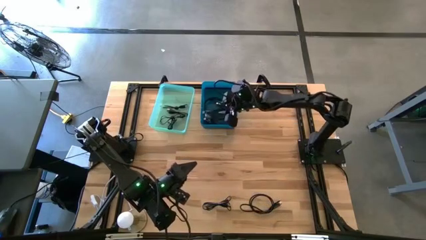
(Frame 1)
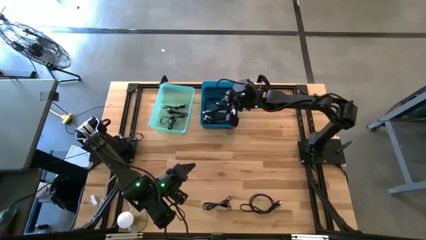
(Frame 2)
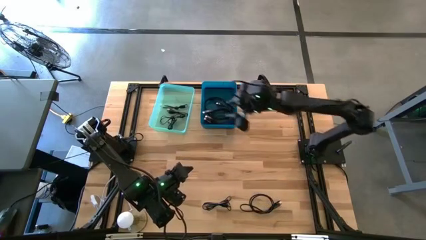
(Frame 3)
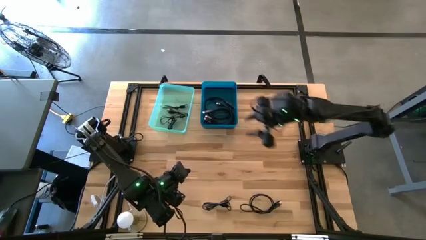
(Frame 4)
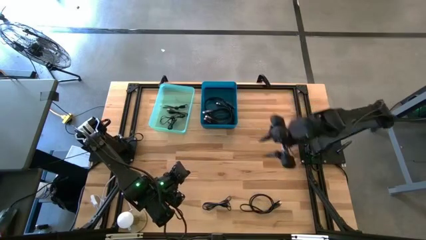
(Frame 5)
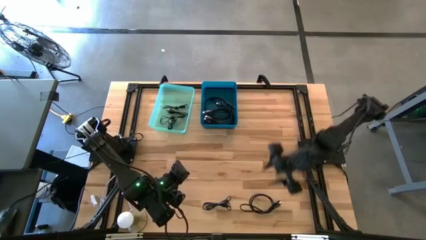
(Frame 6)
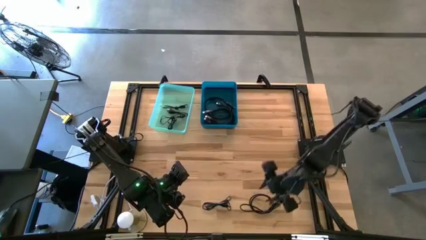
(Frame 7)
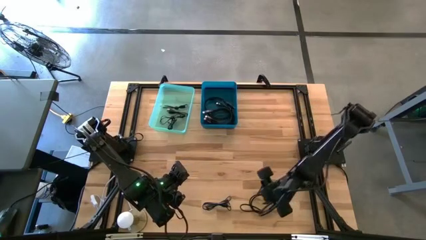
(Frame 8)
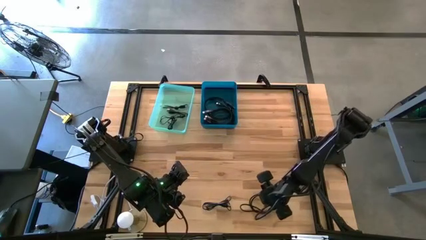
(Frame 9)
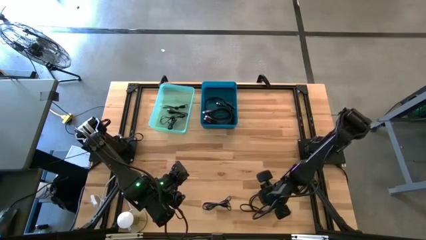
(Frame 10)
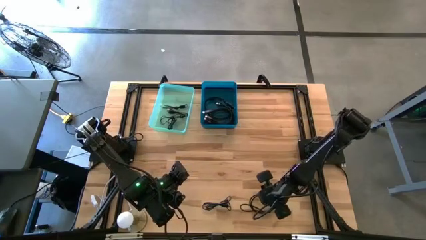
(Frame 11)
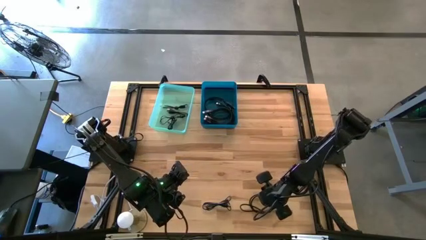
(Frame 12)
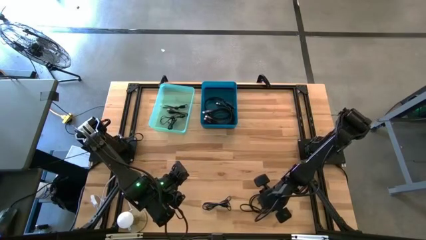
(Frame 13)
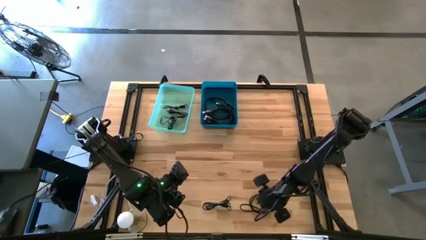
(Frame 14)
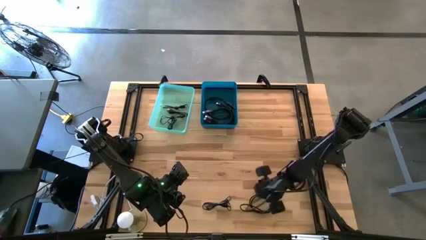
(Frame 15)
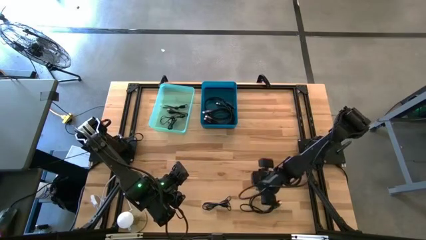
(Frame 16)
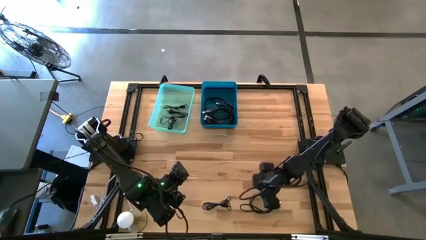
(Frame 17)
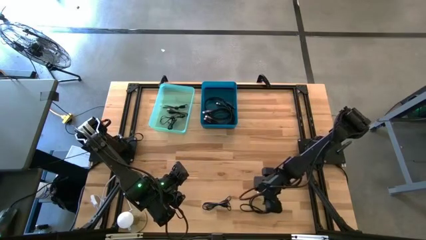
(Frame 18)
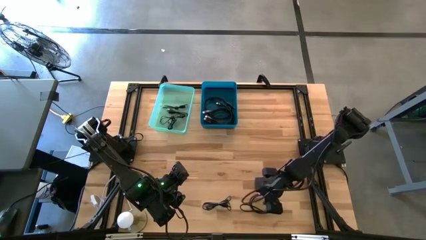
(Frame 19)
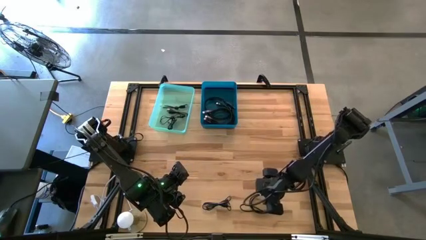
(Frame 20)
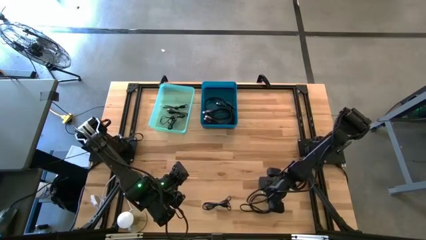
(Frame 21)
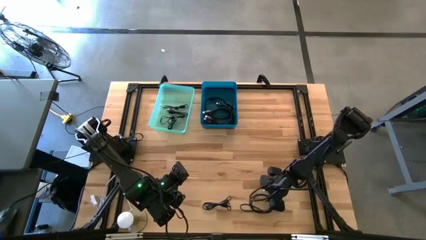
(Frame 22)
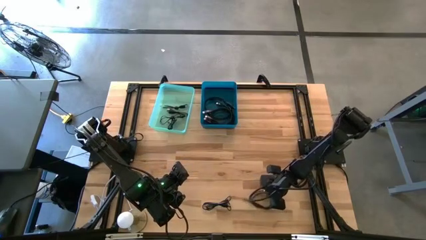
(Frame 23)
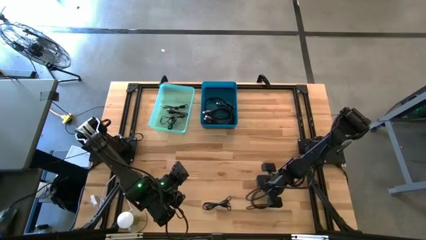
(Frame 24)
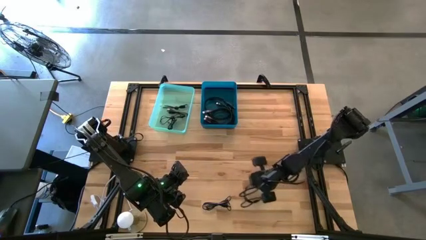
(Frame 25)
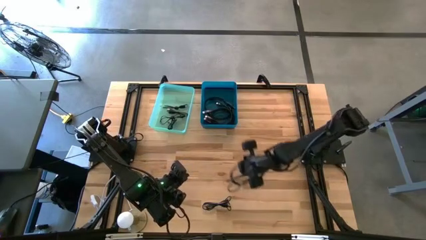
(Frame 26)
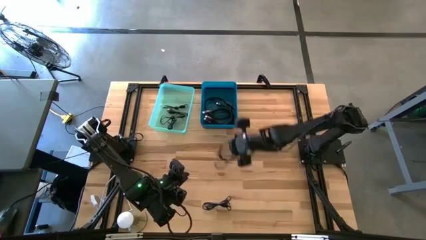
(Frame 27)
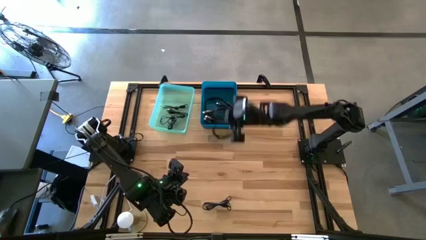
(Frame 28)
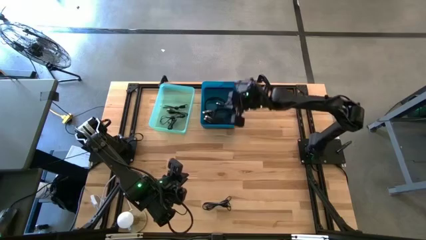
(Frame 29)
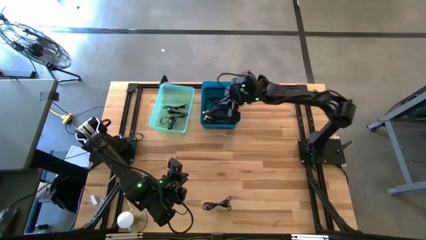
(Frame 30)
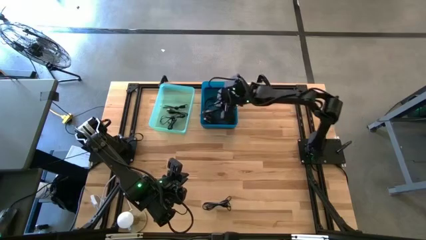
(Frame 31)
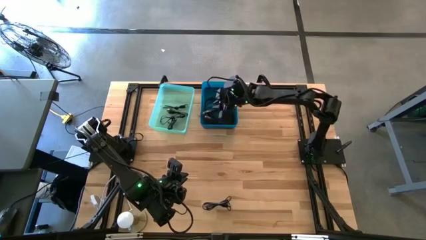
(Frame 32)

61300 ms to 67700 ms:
Task: Pick & Place USB Port
Put the black HDMI cable into the blue bin

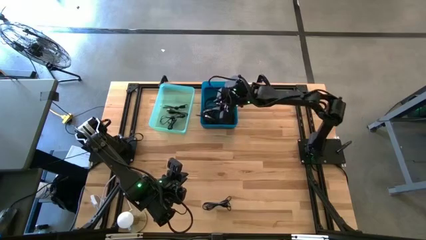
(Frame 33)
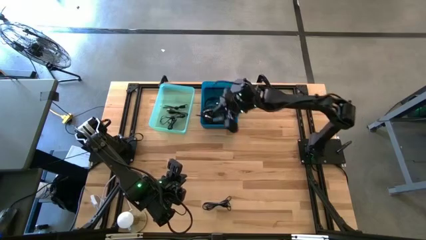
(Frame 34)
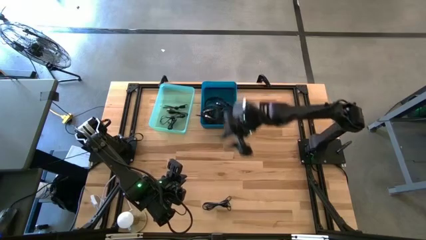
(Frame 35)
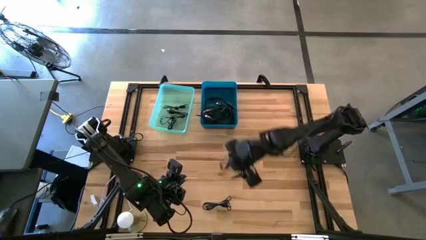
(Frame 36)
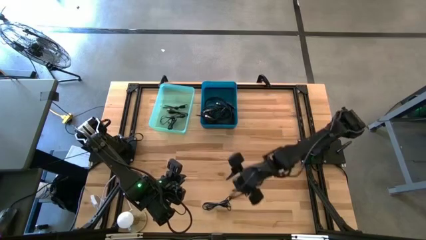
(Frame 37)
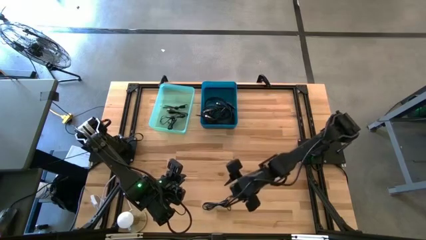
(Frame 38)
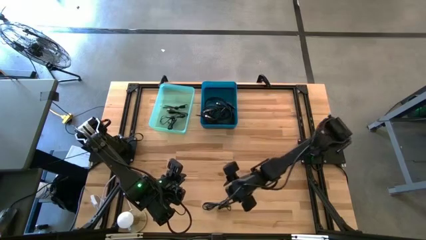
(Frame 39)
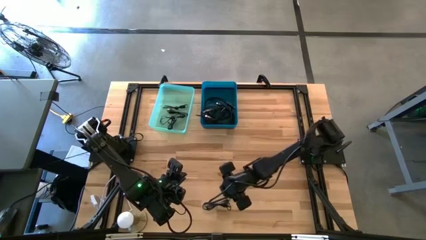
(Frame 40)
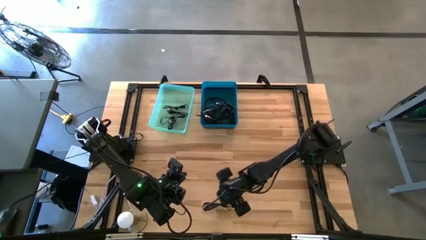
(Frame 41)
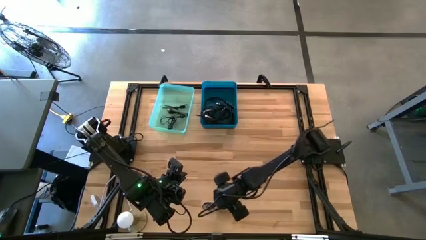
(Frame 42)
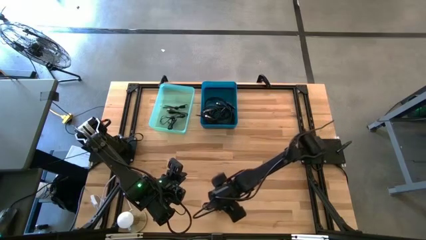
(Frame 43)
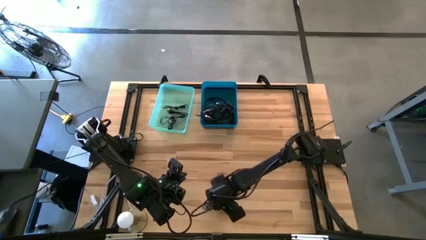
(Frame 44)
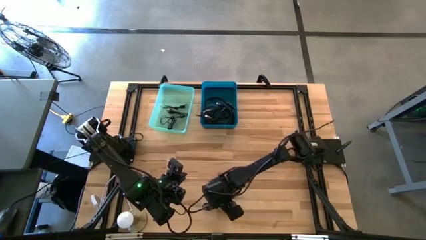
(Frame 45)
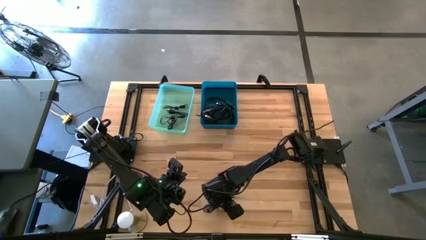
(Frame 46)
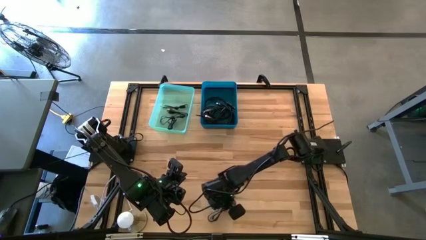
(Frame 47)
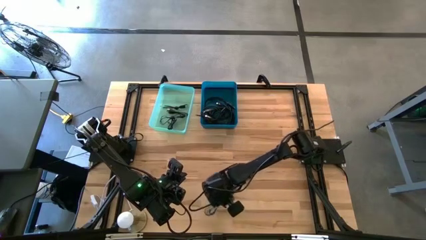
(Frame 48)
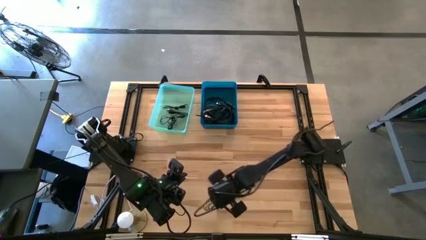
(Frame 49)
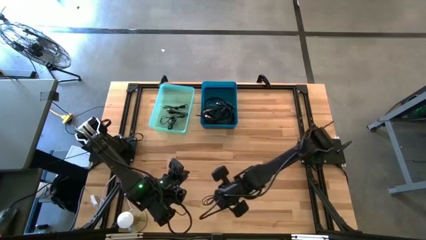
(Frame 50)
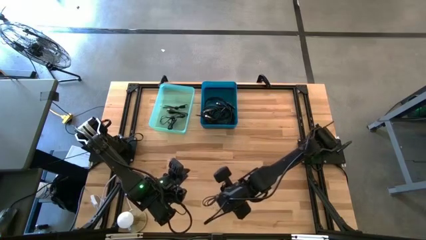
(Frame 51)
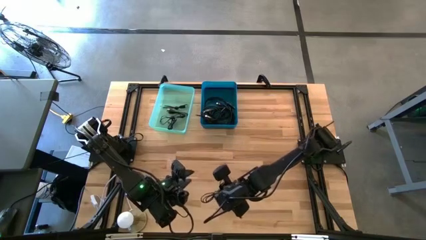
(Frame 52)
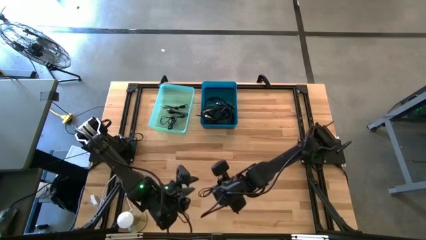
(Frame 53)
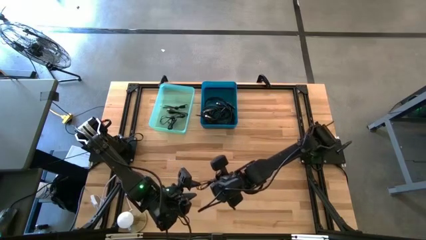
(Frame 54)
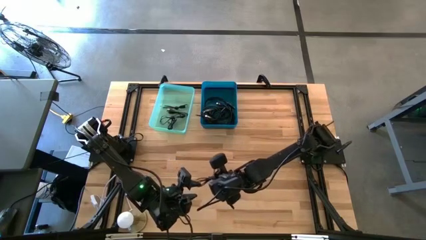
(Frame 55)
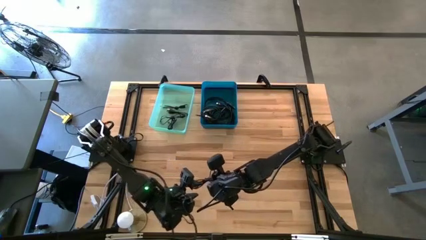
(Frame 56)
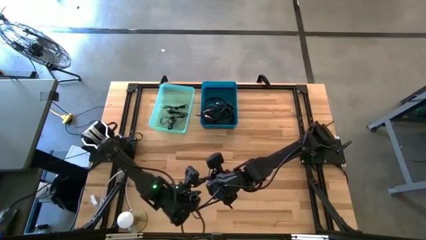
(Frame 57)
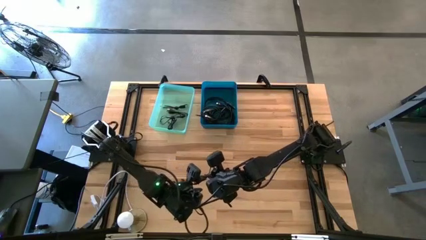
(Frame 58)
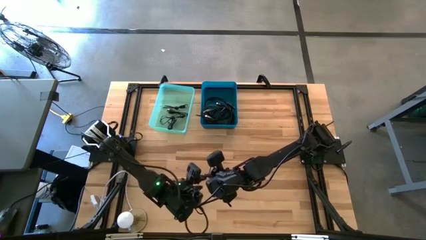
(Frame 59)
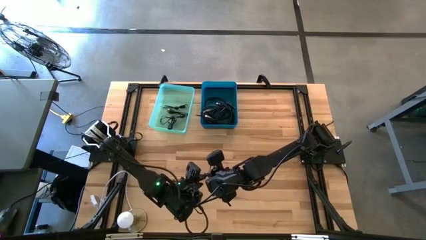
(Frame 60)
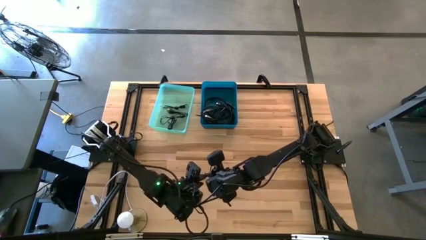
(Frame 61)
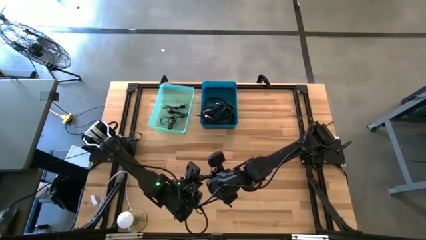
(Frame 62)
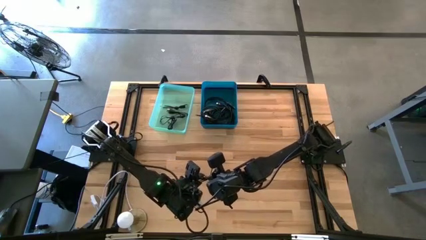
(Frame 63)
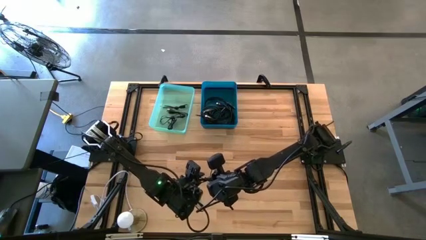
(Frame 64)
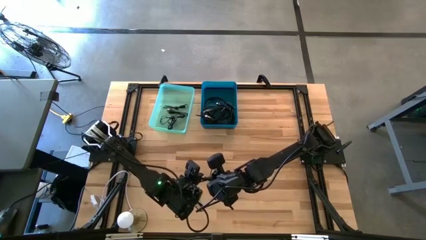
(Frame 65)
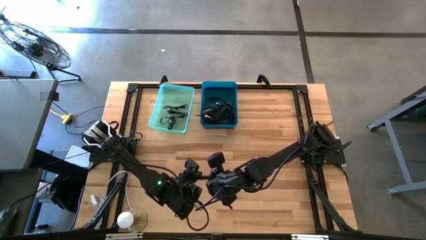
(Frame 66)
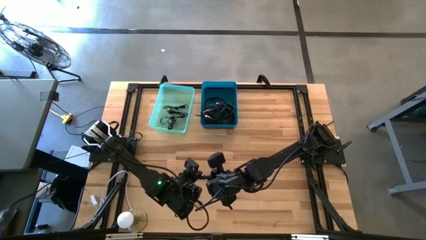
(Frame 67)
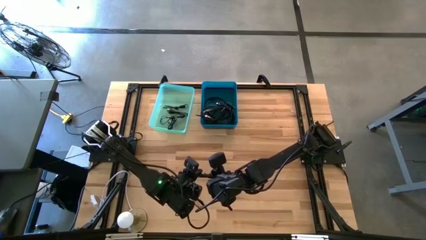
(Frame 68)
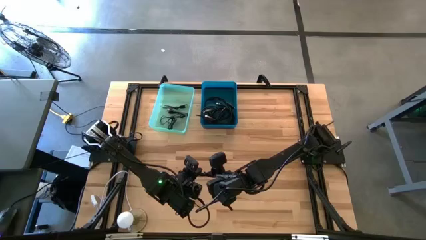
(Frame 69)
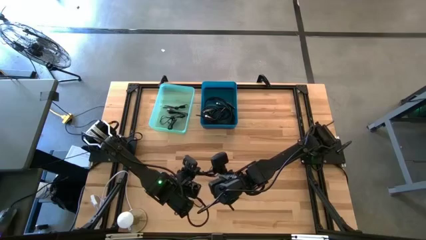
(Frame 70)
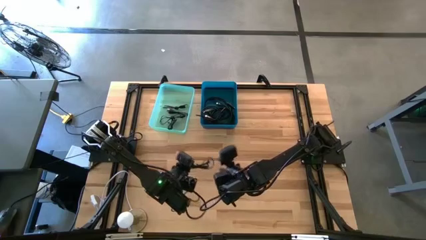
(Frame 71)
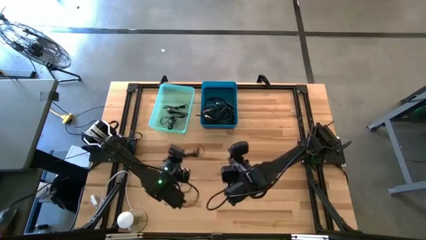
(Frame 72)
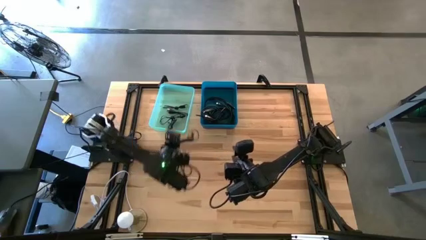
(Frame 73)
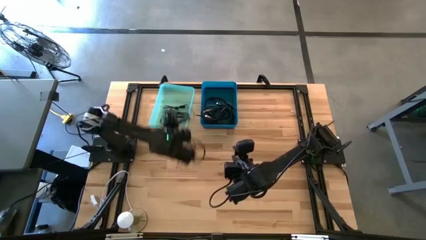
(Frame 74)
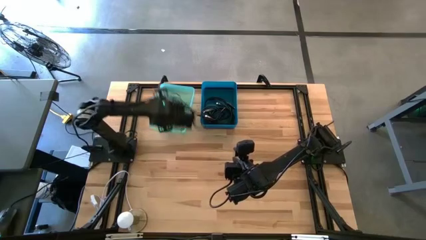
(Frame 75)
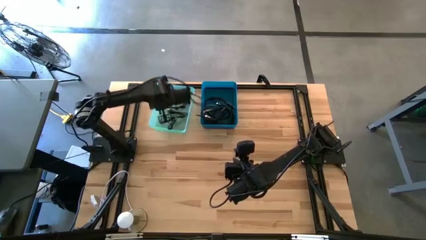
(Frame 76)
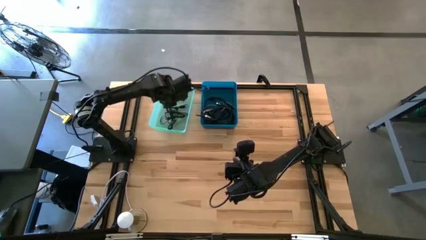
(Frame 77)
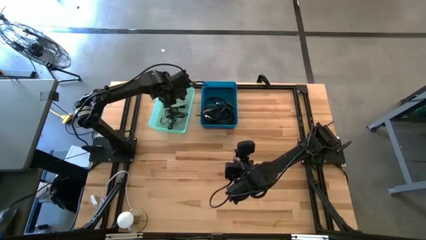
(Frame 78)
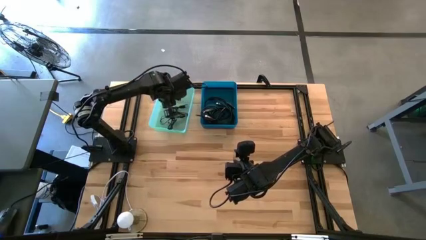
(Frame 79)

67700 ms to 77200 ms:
Put the black USB cable into the green bin
